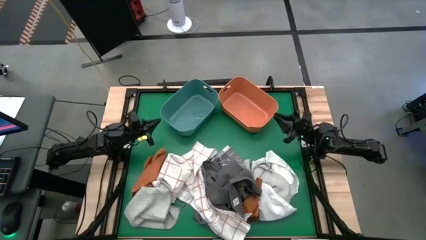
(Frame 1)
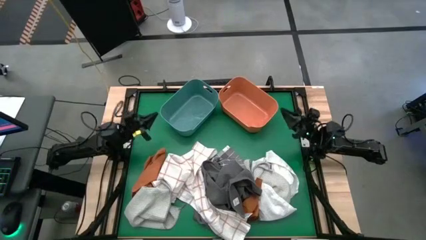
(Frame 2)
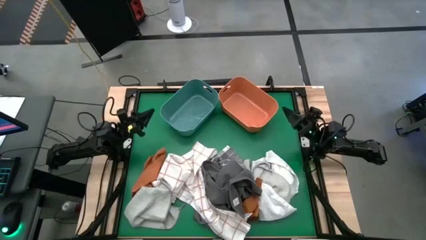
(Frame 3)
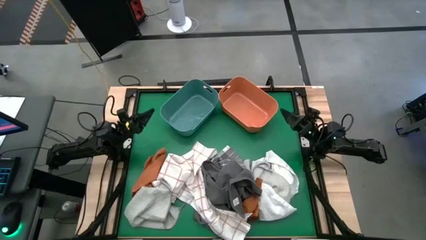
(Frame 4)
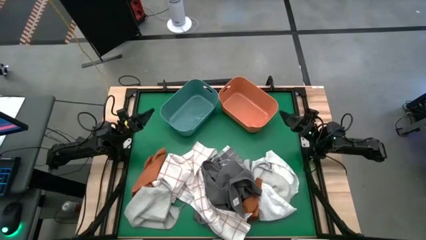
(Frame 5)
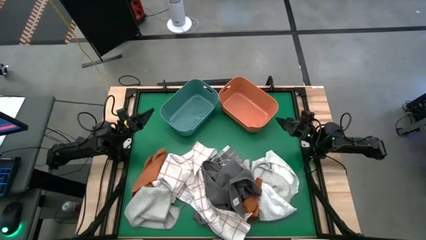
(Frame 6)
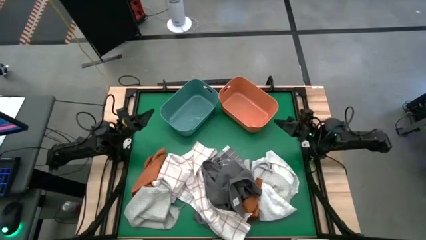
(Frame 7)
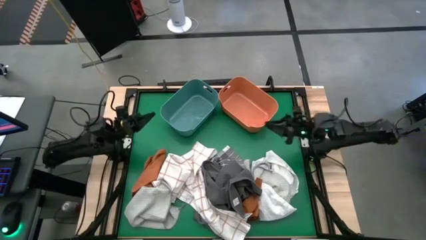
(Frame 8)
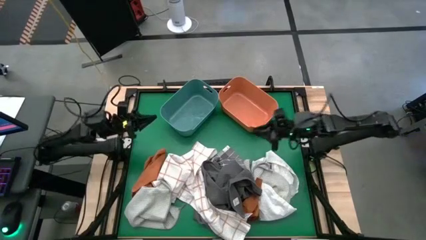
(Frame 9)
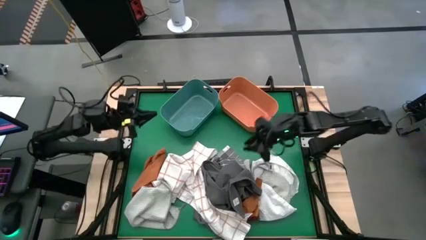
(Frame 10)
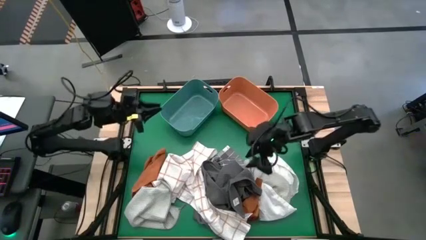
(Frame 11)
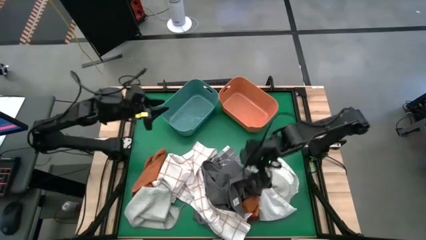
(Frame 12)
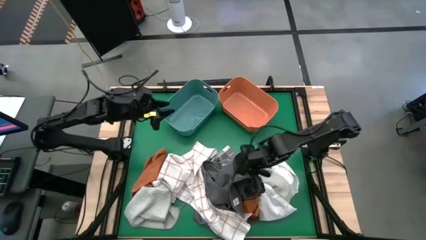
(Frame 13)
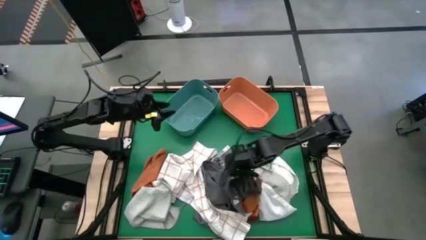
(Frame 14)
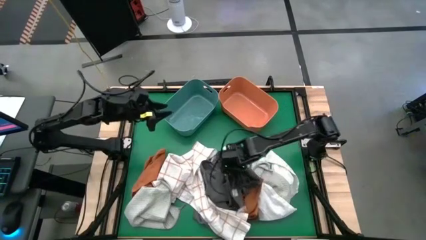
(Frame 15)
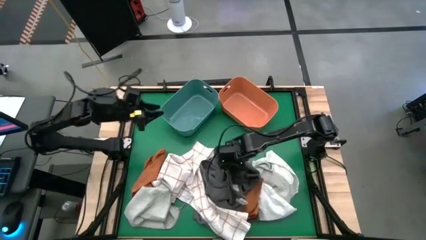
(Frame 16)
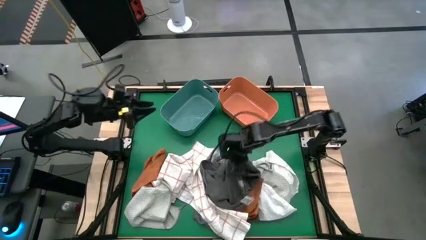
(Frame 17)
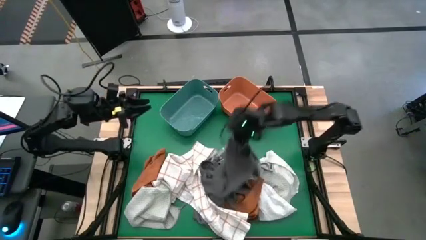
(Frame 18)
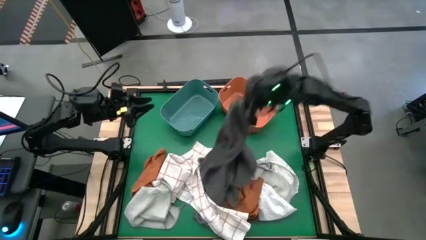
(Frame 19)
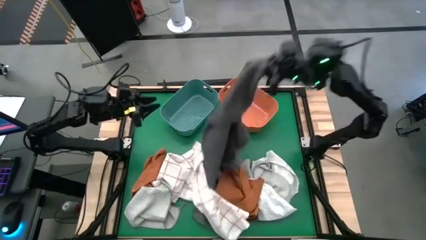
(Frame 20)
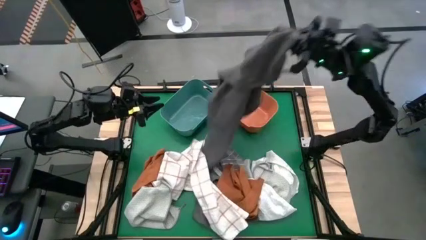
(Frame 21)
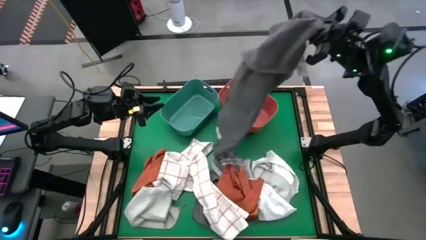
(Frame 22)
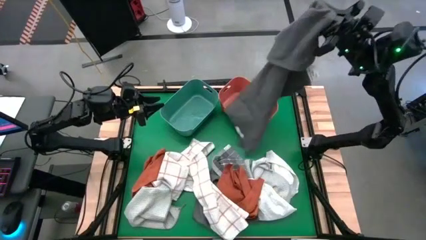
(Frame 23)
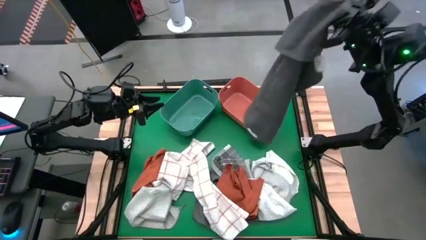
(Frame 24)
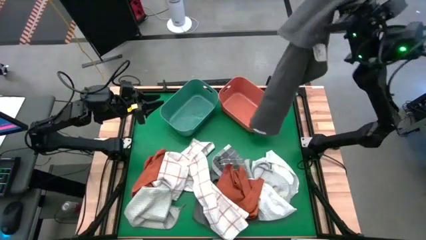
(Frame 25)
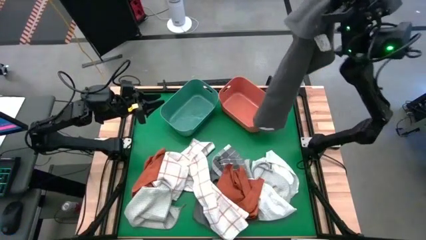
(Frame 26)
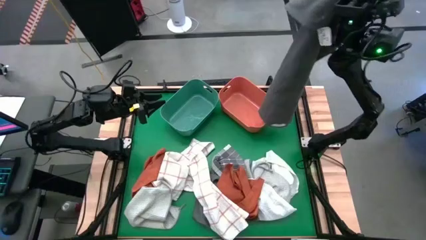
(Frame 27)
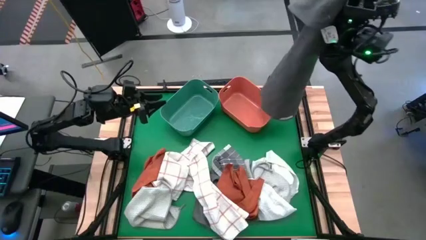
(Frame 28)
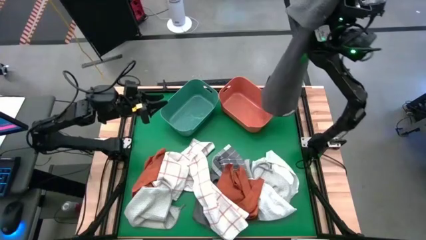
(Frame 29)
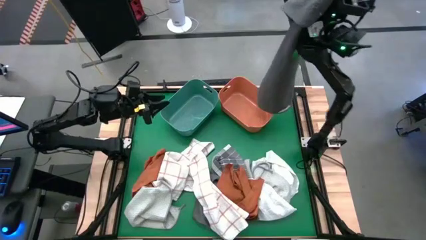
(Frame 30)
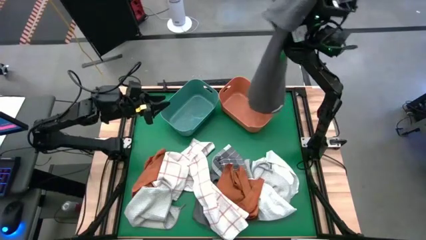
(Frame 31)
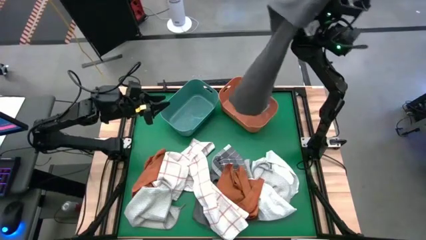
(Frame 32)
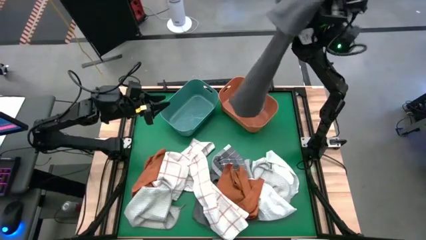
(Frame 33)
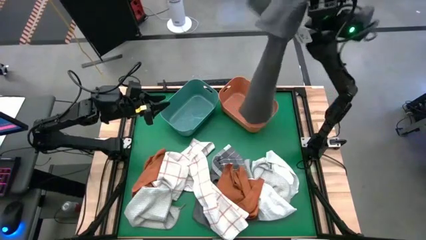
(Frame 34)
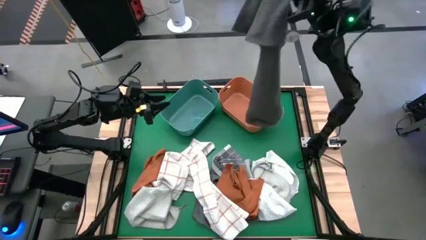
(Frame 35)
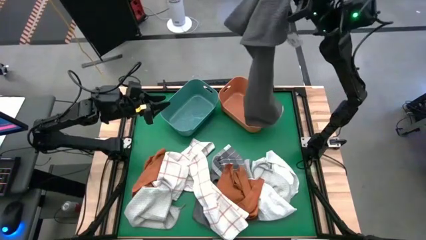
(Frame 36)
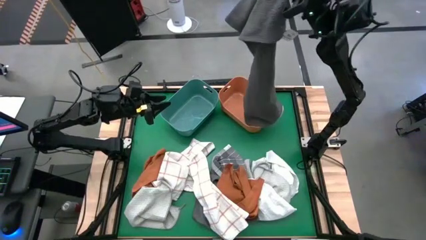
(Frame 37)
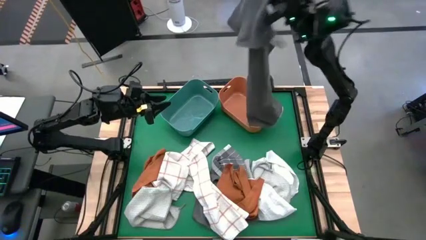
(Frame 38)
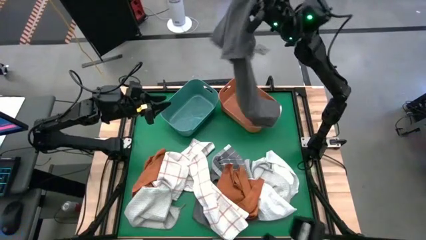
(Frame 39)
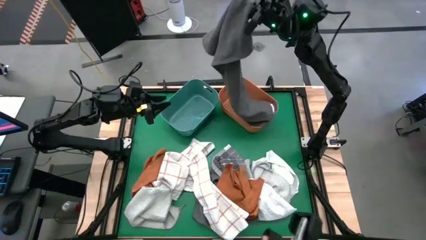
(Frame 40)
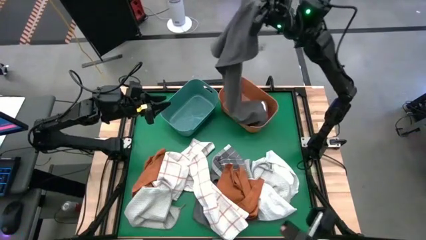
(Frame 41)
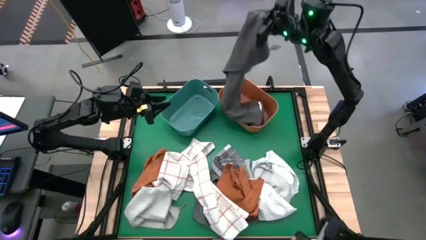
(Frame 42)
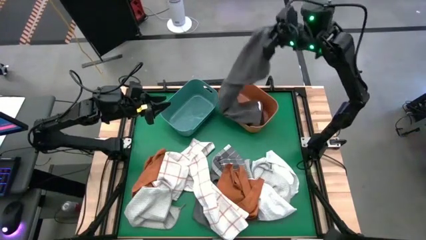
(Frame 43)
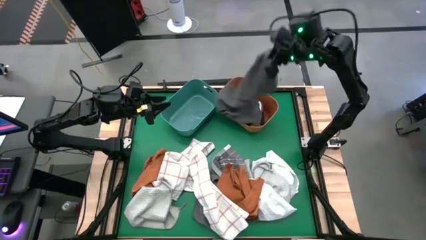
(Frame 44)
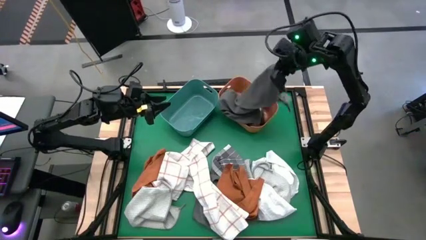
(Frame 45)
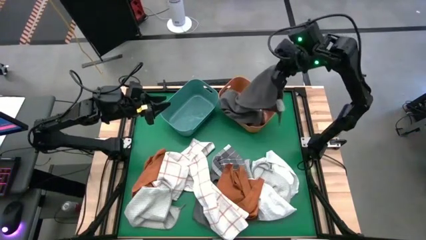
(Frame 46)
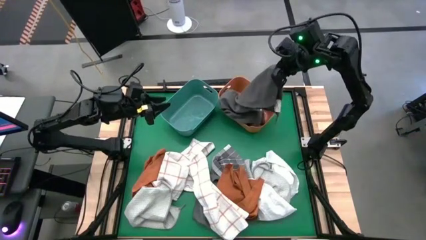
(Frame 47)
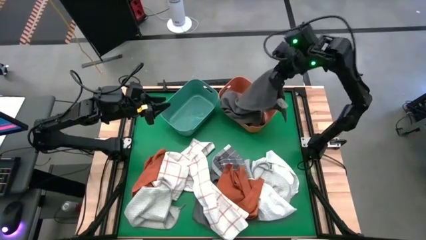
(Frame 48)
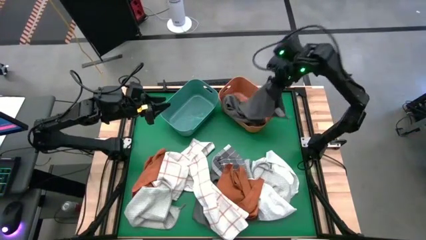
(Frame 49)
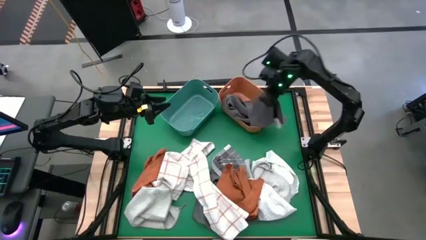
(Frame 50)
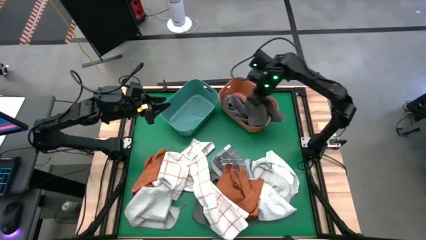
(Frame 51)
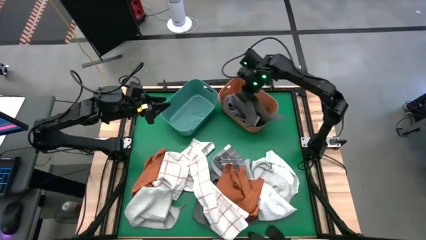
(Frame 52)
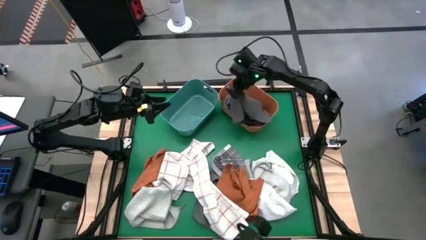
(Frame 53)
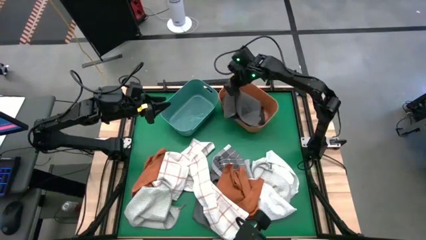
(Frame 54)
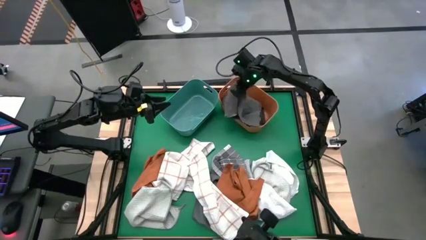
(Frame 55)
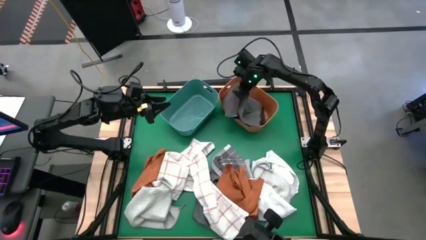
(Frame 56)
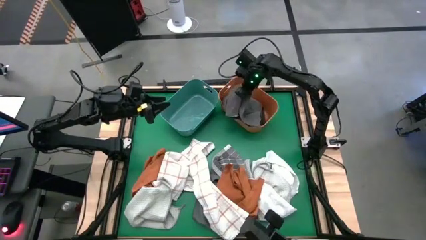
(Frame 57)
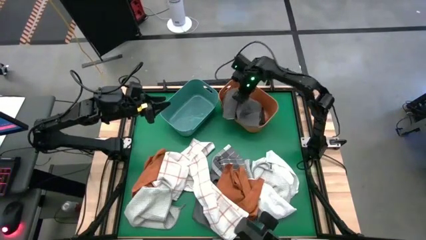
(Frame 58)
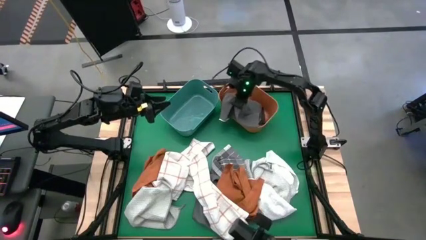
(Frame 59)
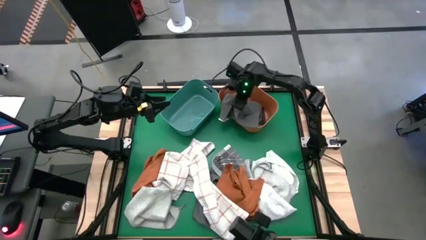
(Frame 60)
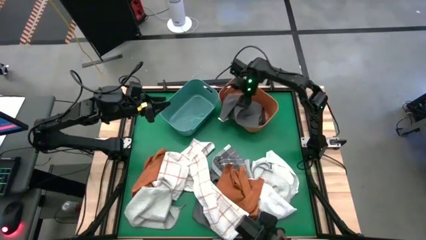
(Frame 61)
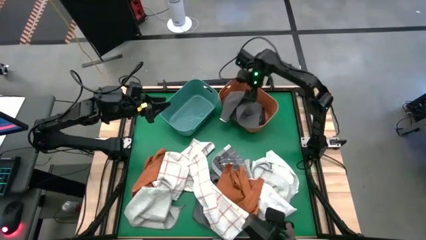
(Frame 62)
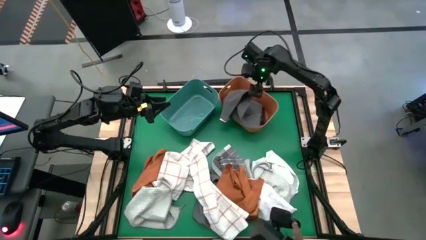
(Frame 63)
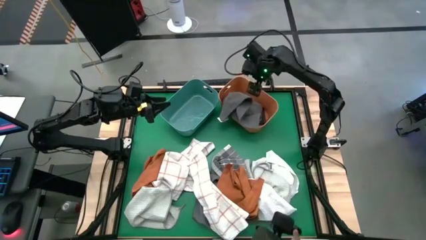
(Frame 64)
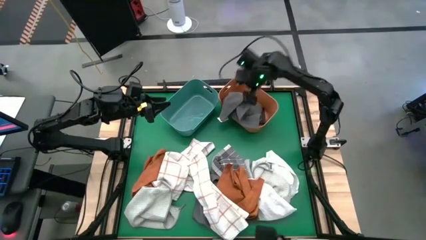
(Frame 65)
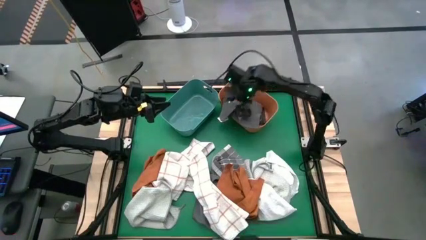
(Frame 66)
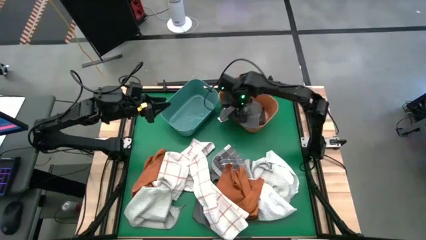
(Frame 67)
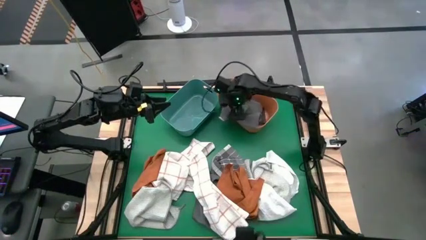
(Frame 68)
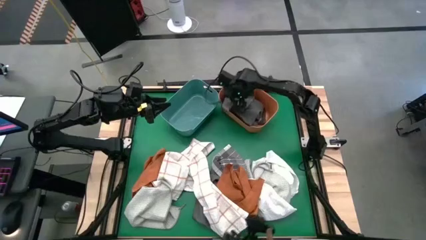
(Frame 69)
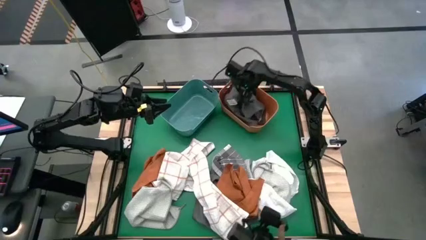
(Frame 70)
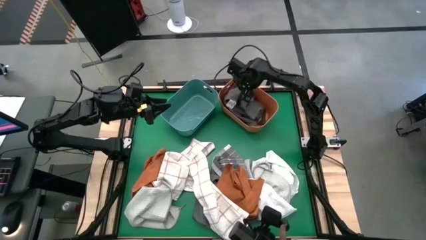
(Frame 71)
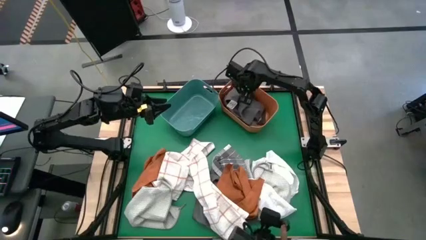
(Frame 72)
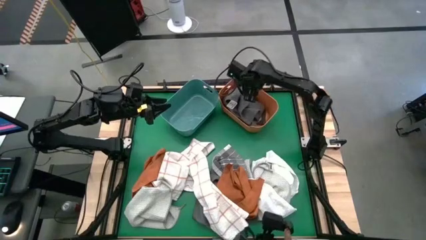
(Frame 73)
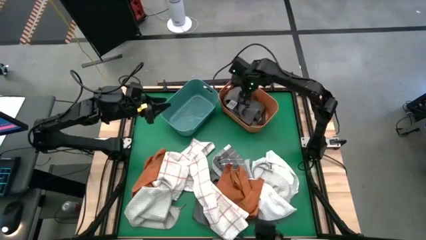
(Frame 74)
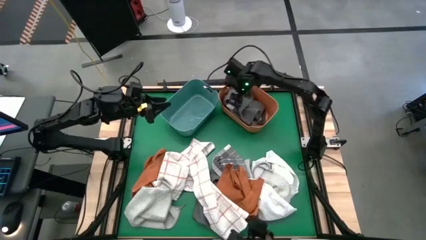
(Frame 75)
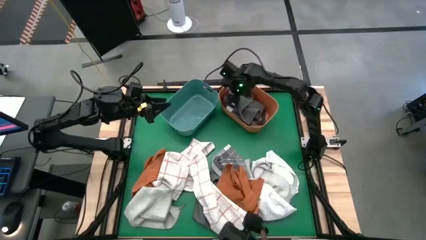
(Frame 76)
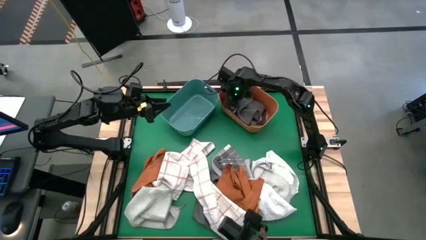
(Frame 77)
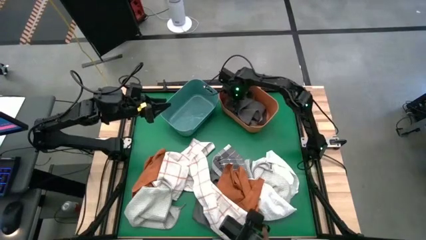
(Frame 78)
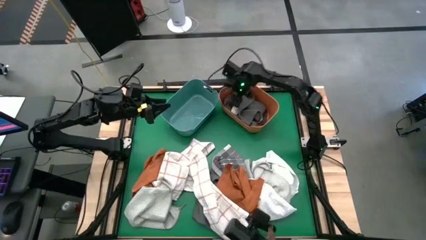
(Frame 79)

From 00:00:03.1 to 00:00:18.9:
Task: Sort towels by color in basket
Put the gray towel into the orange bin
